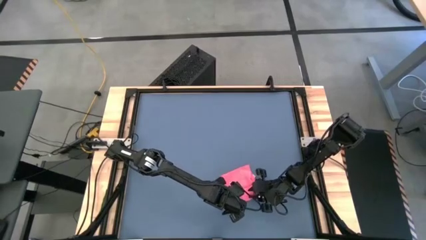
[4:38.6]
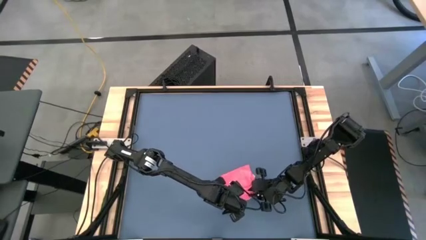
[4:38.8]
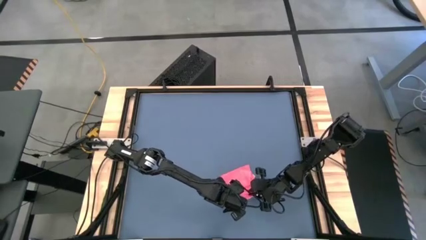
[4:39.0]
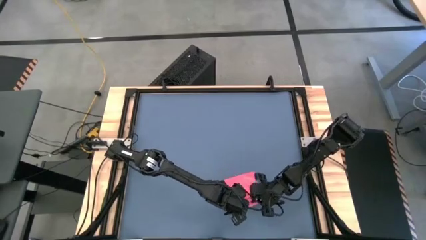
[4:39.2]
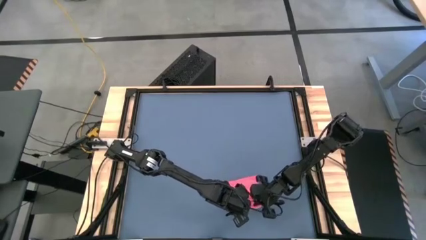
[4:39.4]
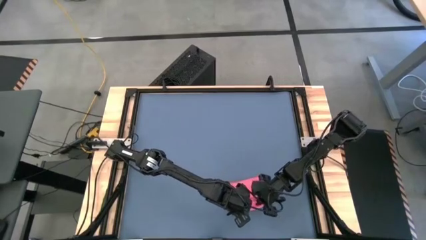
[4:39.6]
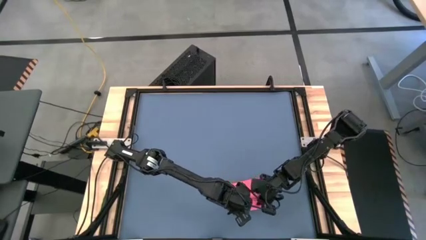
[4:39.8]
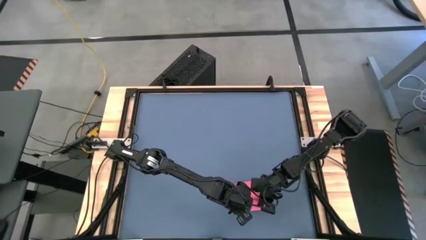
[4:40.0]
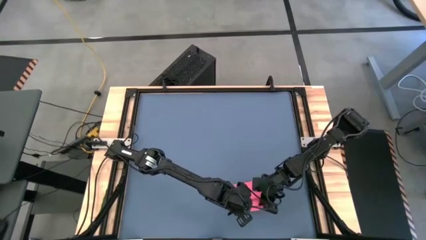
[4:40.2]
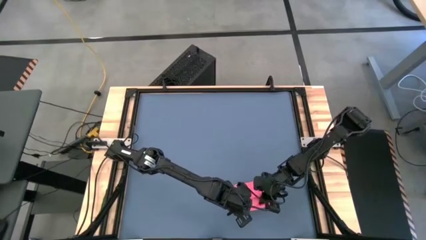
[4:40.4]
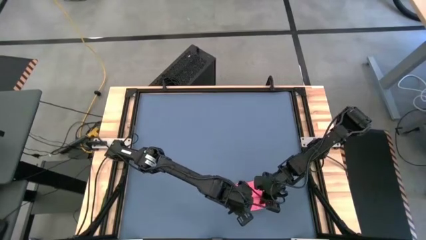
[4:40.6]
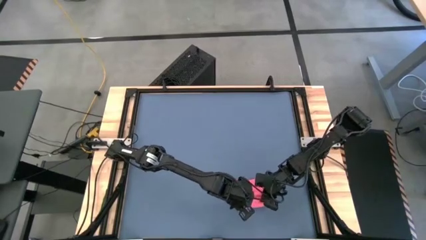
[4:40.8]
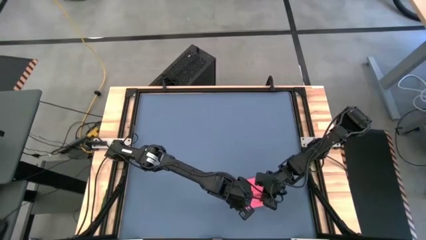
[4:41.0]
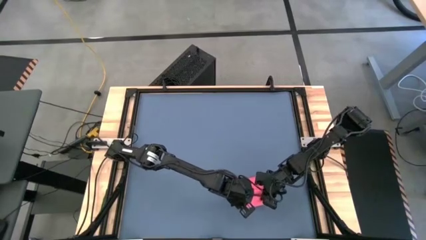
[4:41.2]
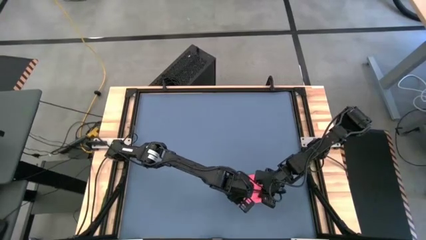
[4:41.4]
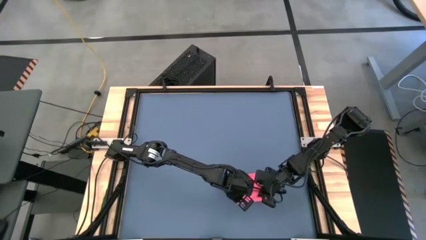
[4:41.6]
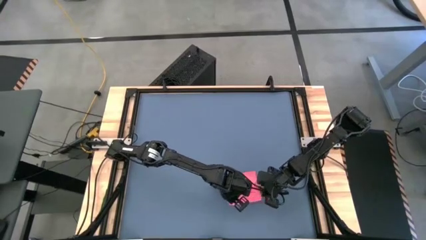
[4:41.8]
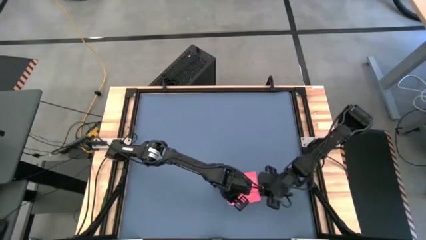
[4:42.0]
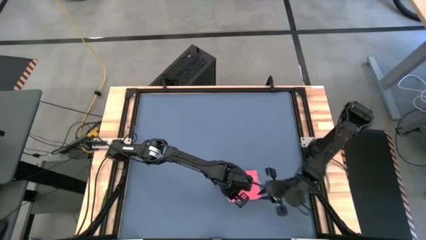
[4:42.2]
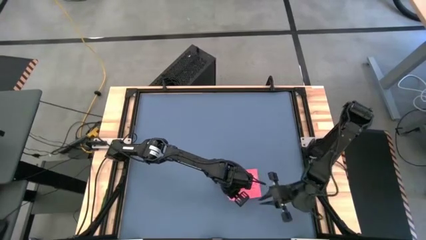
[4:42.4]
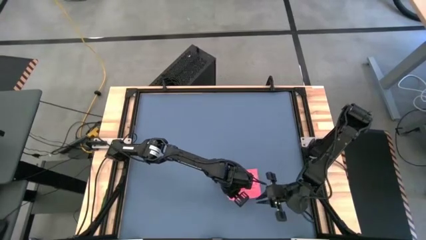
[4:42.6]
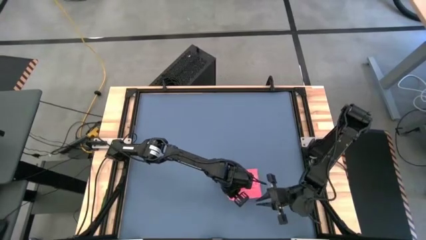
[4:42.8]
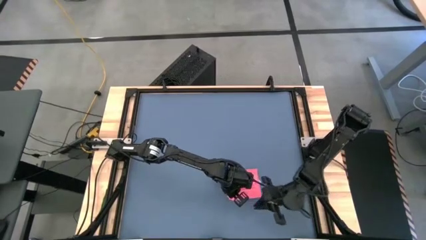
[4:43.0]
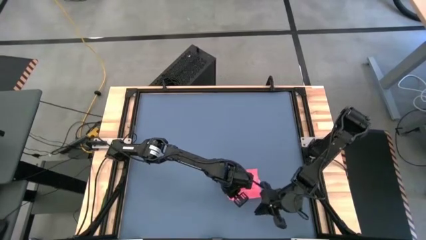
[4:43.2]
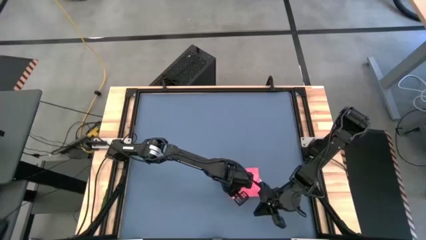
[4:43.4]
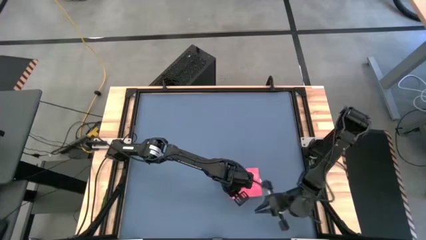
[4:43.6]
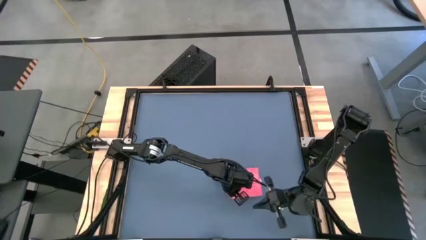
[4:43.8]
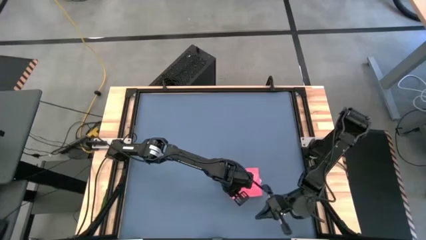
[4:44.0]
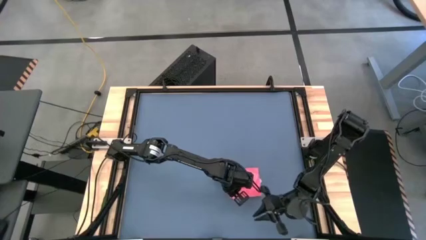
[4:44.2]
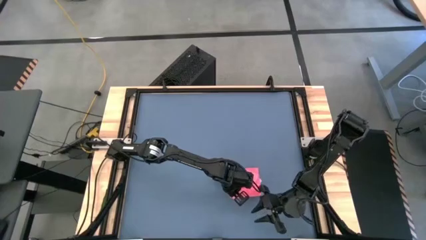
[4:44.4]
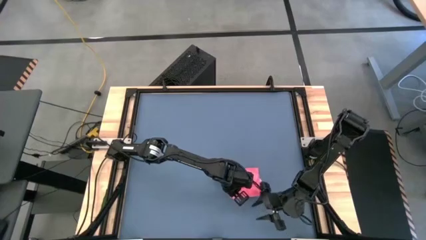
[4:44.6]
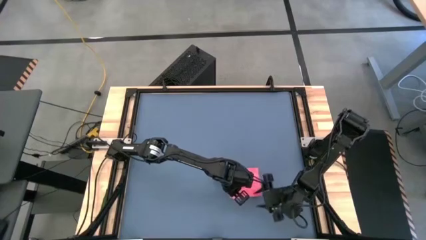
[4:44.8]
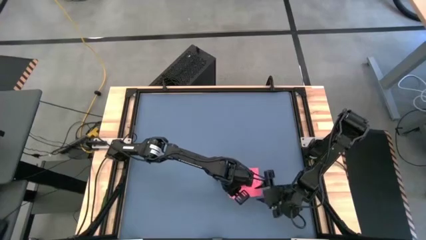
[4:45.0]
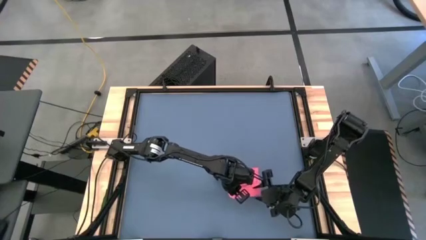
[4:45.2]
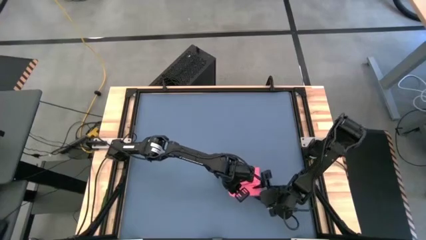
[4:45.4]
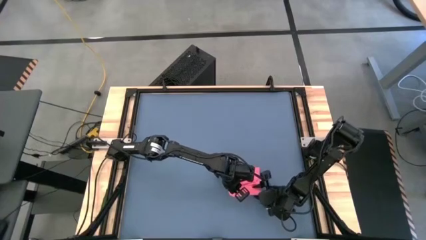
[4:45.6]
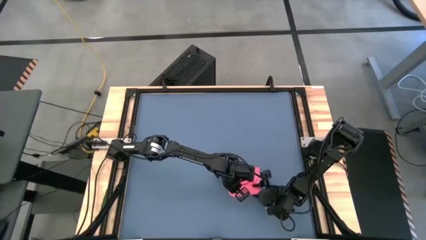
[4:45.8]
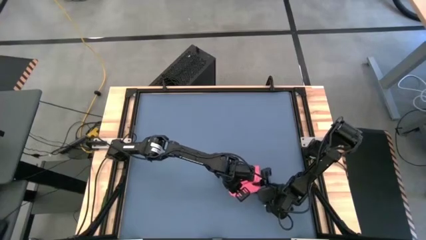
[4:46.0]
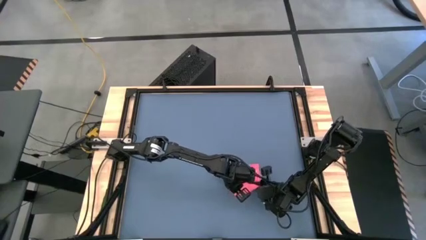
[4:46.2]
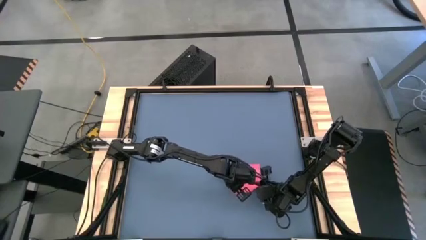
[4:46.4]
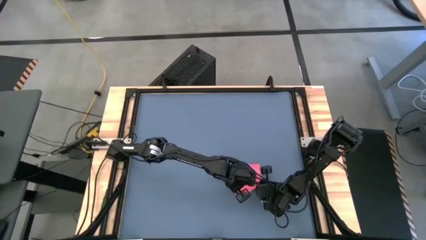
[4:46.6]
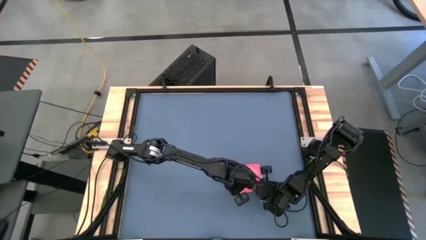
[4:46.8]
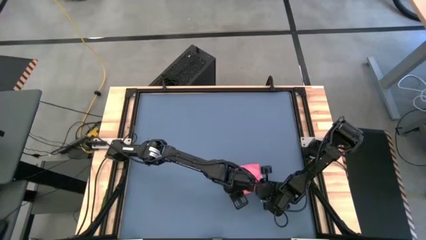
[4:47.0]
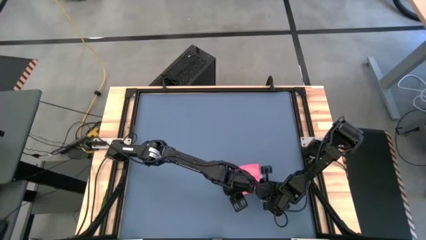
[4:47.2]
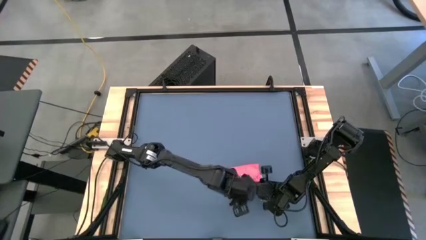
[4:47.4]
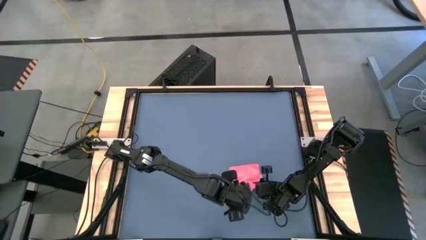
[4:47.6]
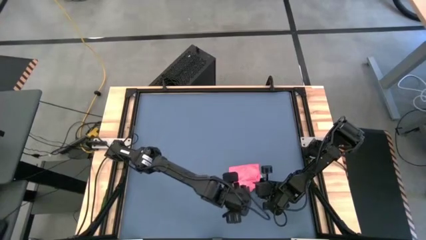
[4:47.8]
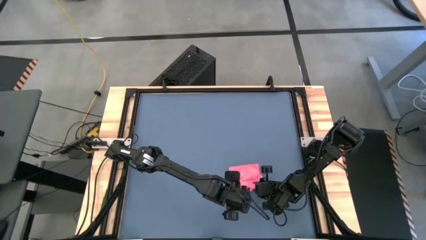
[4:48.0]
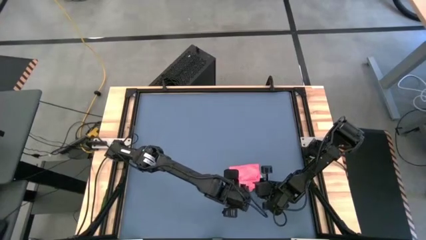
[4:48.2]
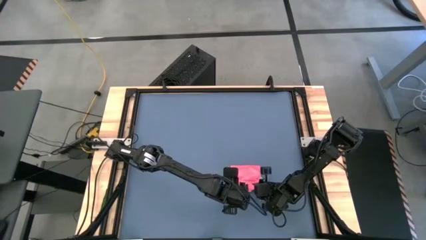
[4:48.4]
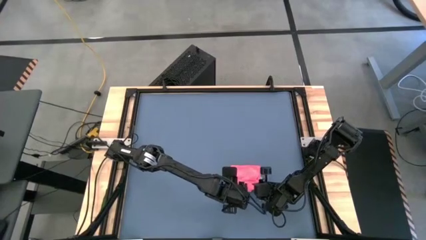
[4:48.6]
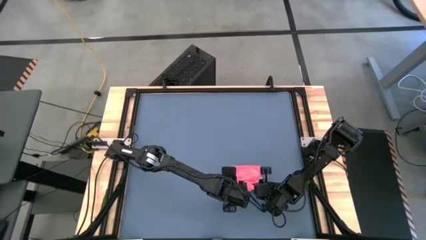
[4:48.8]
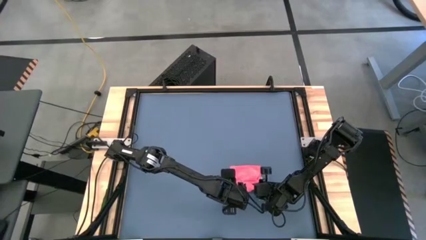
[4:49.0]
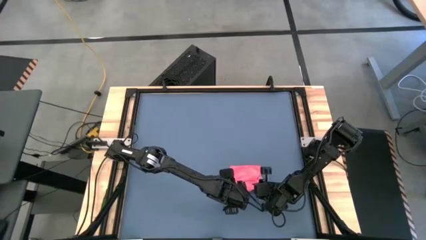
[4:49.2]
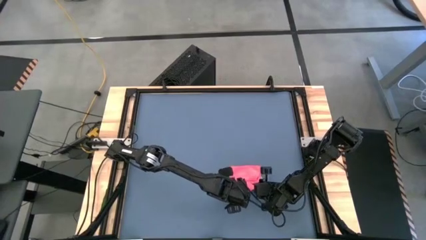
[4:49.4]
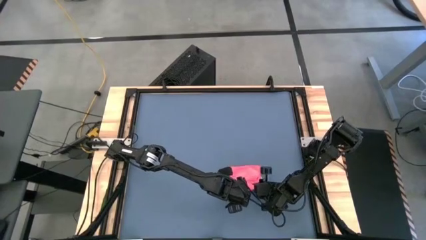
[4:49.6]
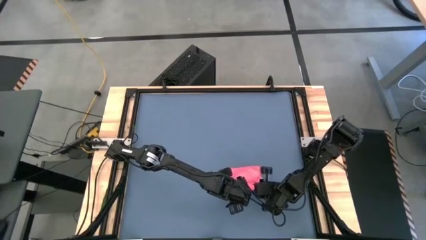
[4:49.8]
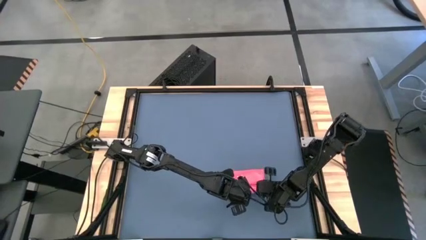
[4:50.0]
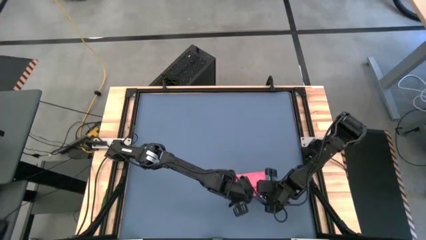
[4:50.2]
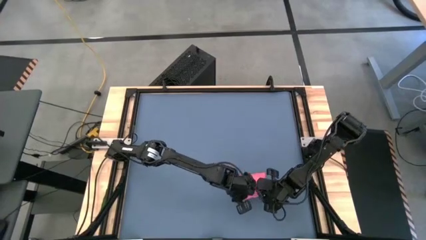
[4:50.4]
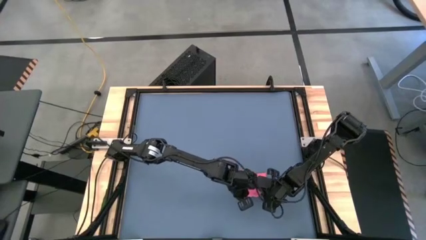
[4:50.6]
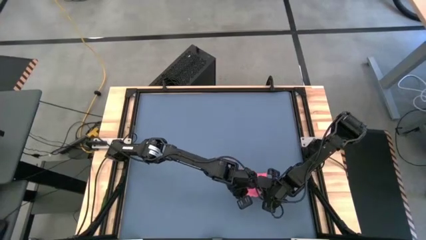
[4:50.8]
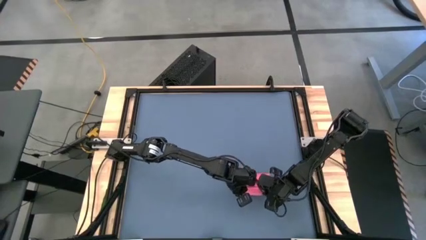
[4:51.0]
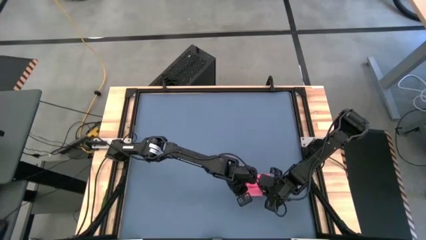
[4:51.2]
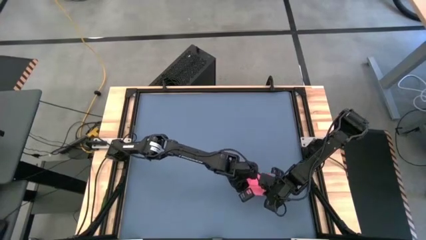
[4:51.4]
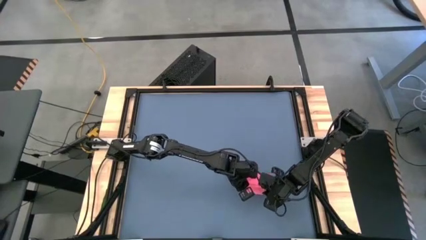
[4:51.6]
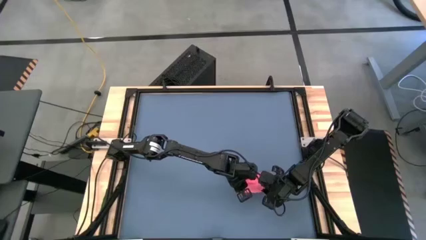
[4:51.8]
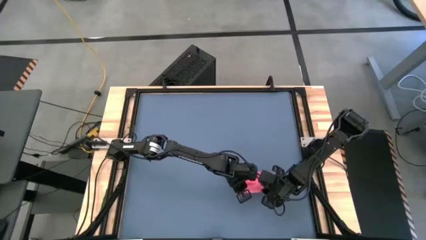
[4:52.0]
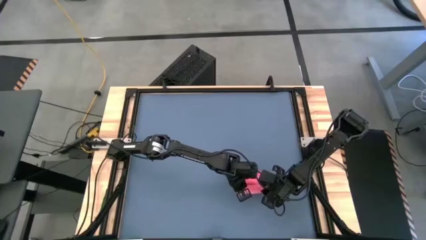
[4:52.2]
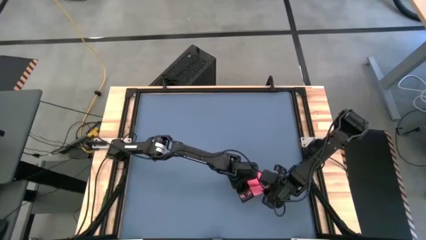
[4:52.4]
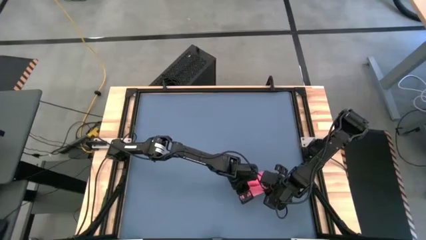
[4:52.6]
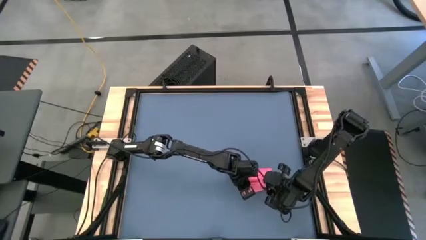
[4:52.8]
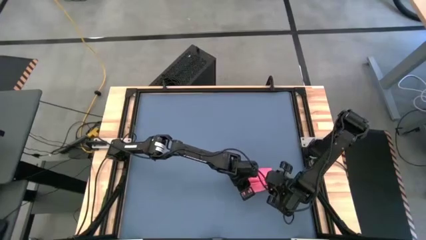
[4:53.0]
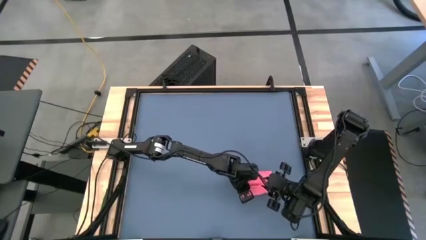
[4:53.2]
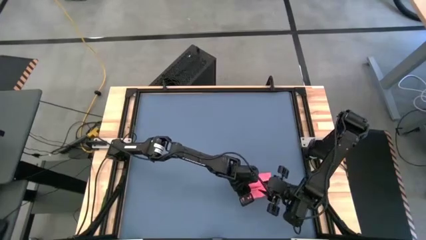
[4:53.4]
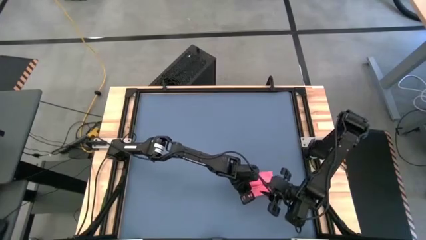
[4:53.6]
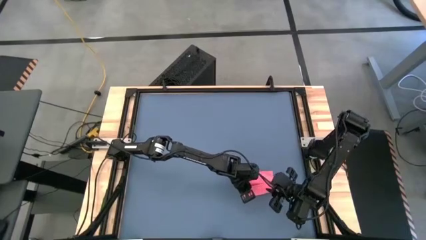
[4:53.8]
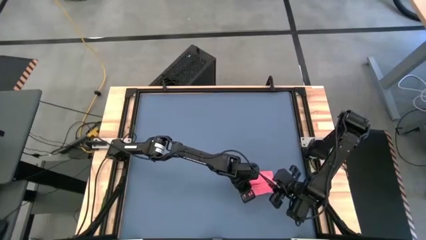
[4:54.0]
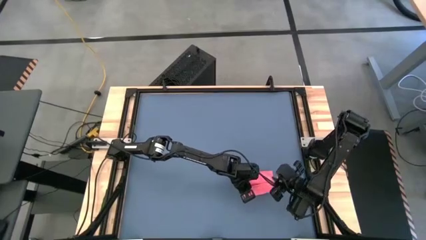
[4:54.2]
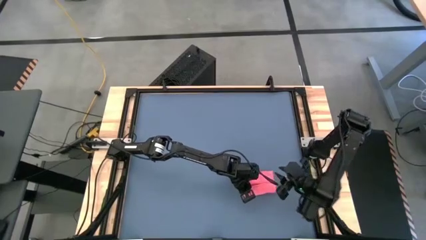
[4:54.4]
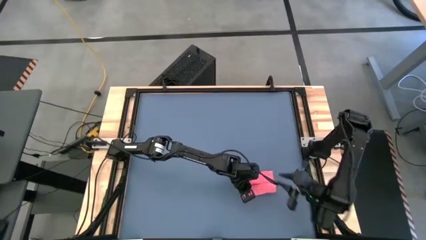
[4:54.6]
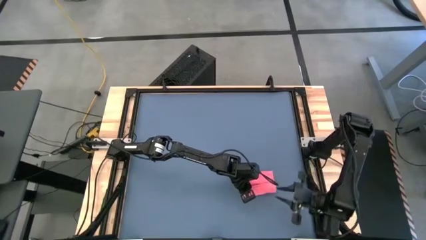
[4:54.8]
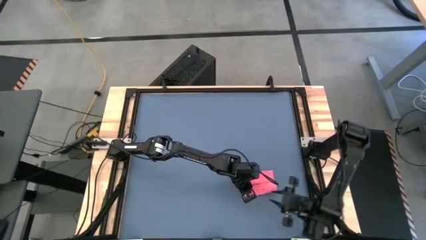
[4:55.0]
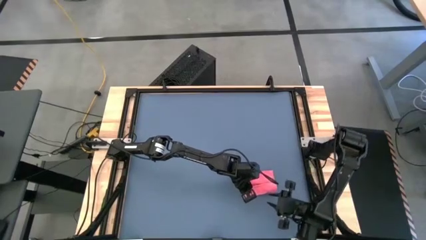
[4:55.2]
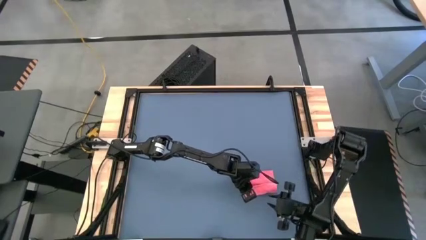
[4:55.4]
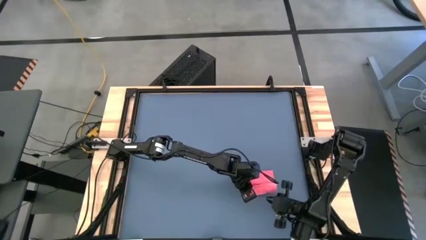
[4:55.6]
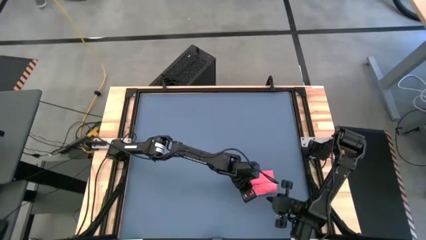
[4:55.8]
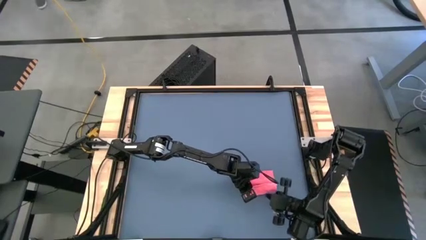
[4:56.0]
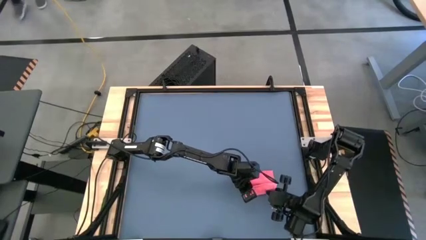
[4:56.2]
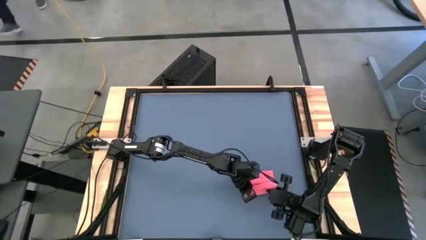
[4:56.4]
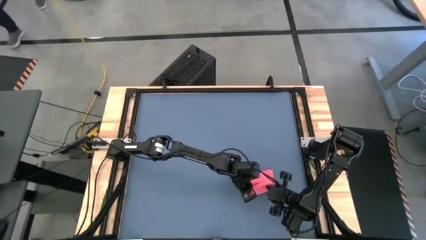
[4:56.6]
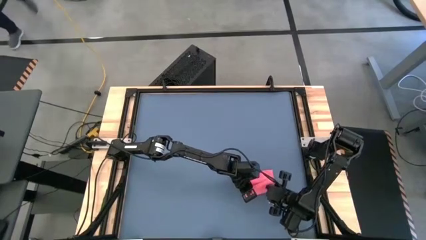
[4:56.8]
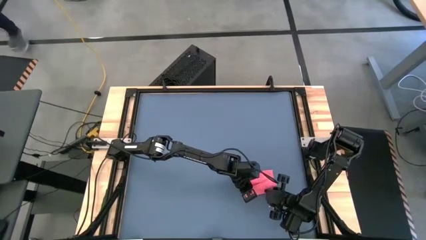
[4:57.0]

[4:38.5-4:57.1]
Task: Roll towel
Roll the pink towel
